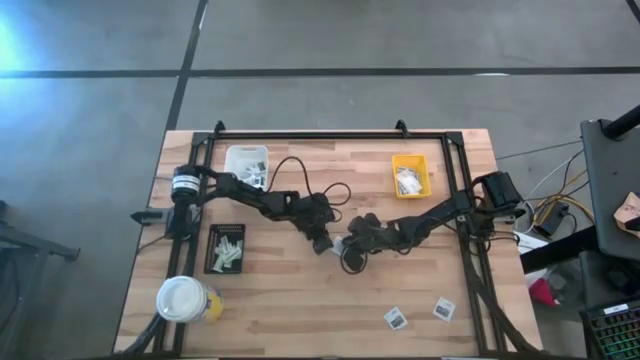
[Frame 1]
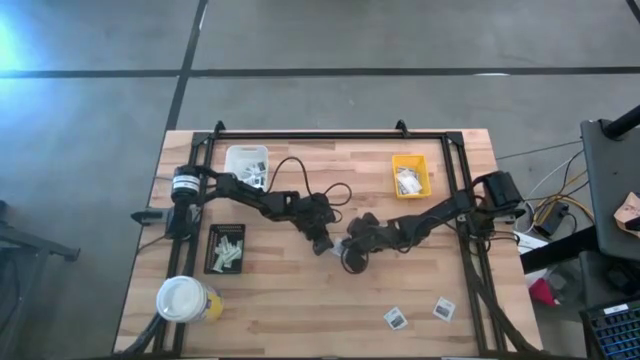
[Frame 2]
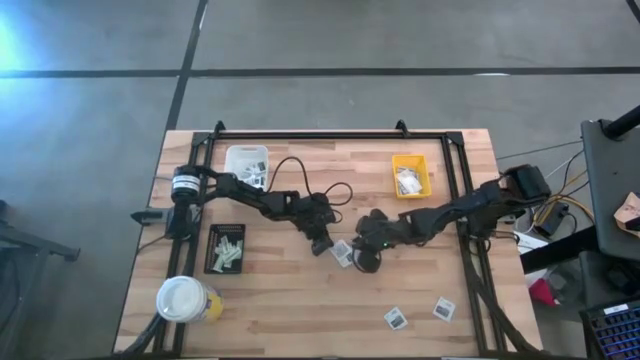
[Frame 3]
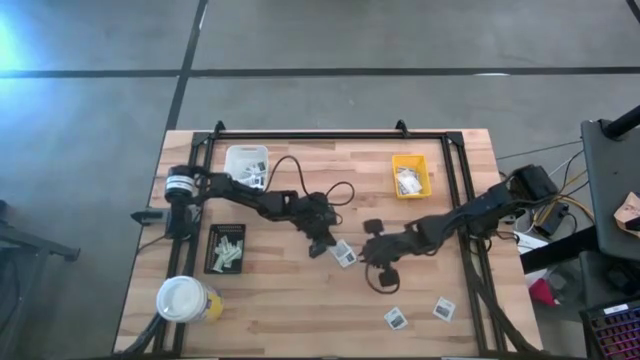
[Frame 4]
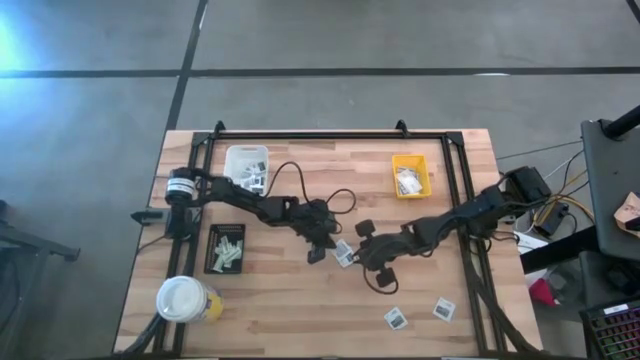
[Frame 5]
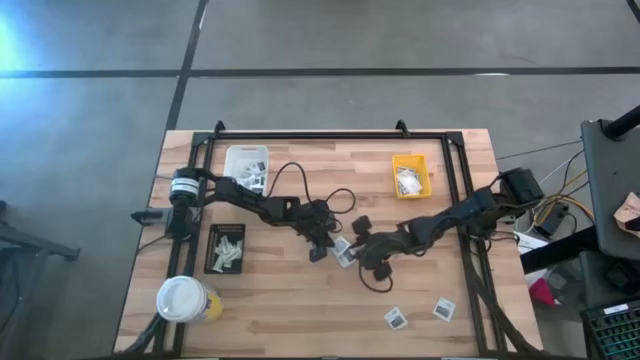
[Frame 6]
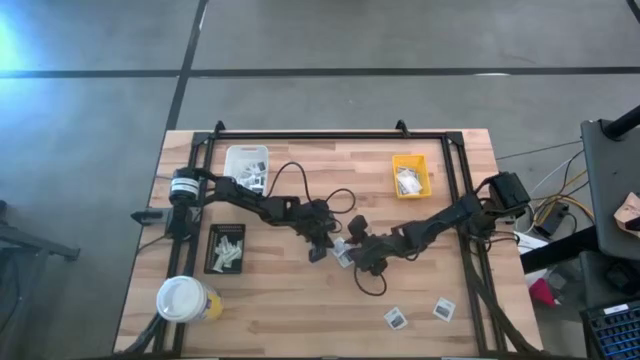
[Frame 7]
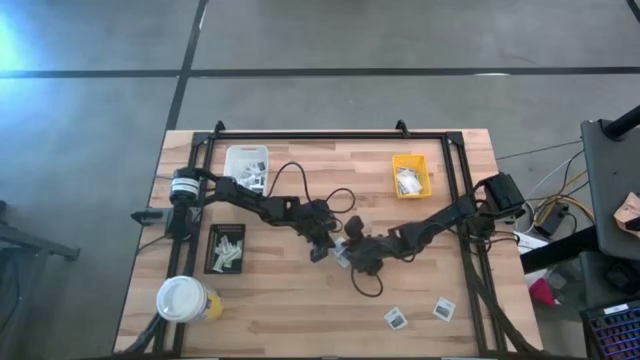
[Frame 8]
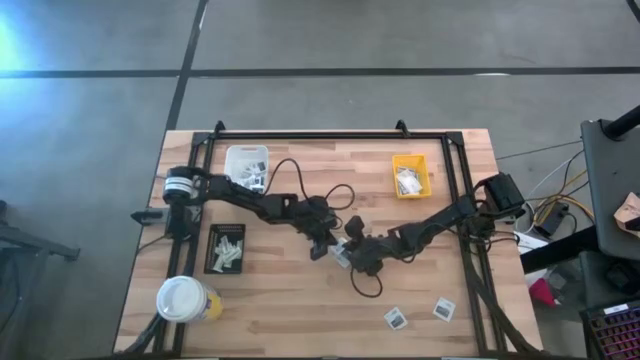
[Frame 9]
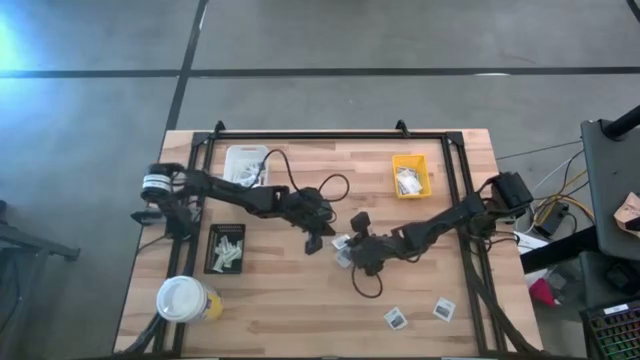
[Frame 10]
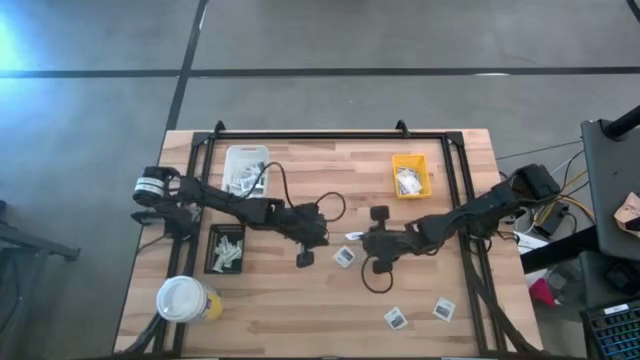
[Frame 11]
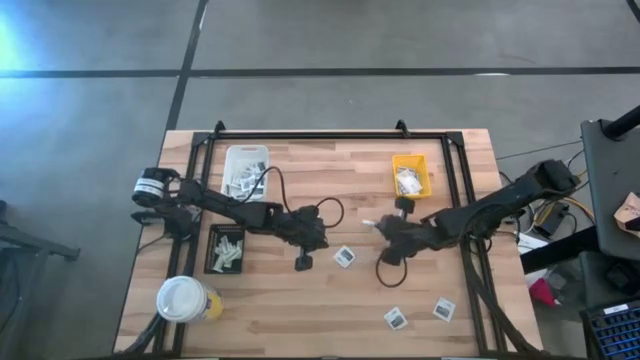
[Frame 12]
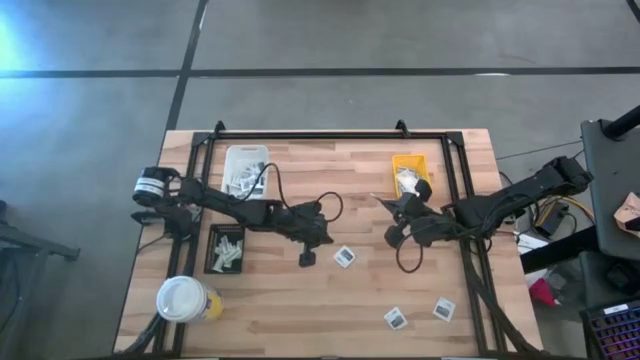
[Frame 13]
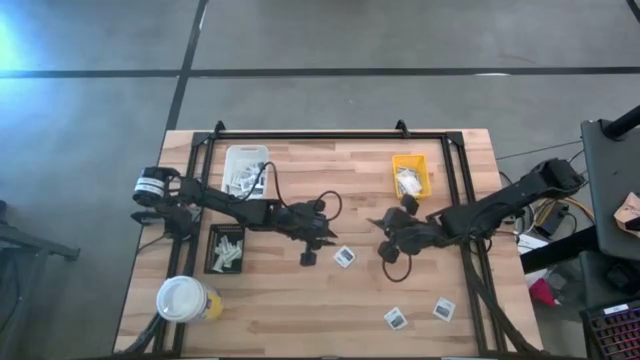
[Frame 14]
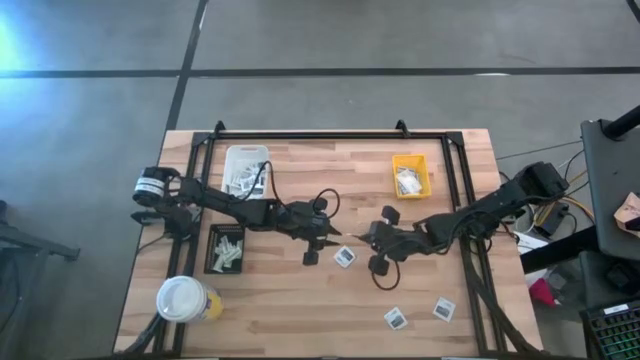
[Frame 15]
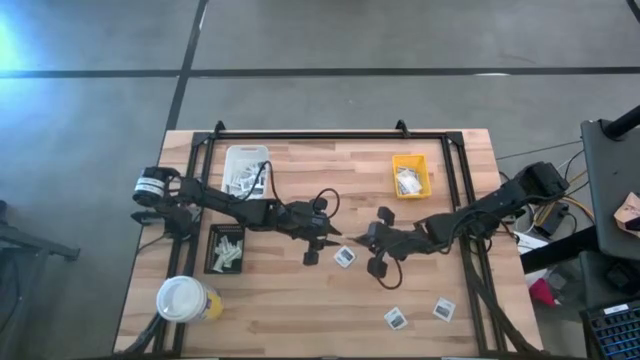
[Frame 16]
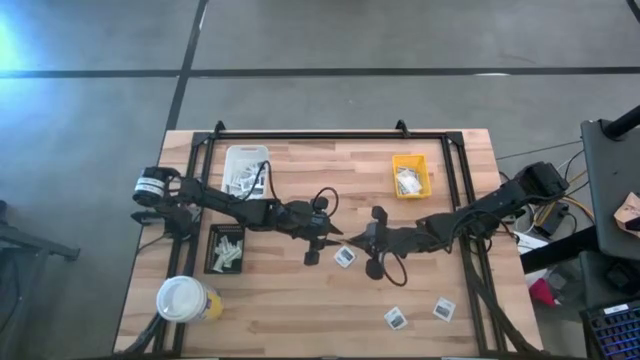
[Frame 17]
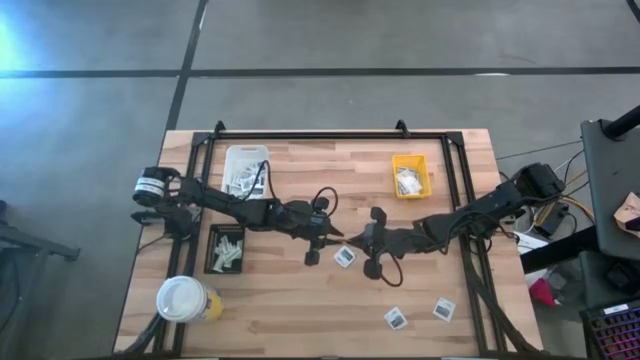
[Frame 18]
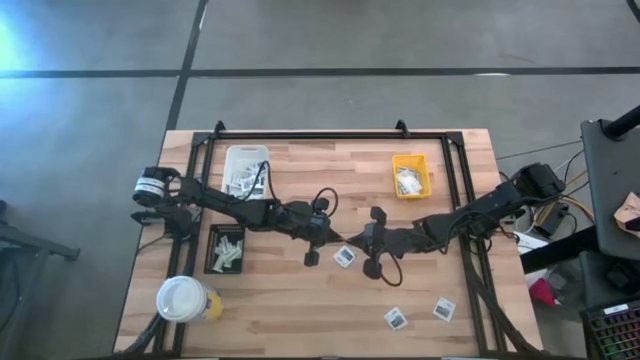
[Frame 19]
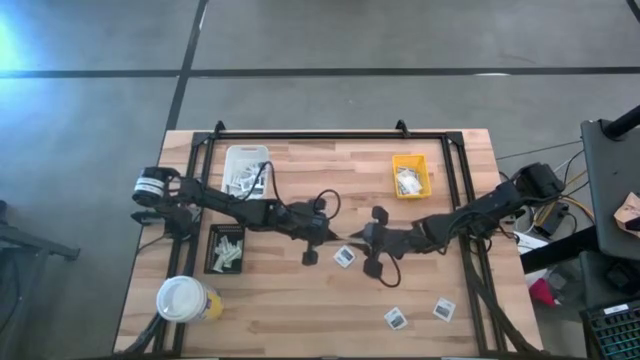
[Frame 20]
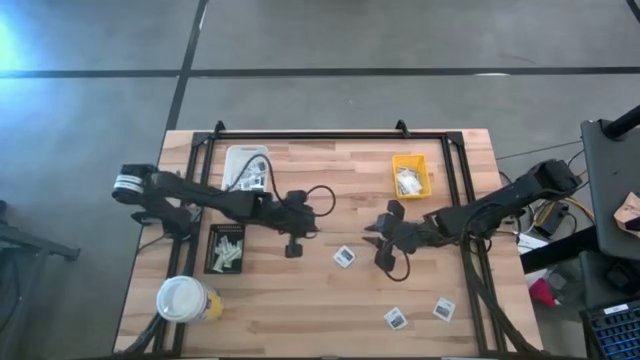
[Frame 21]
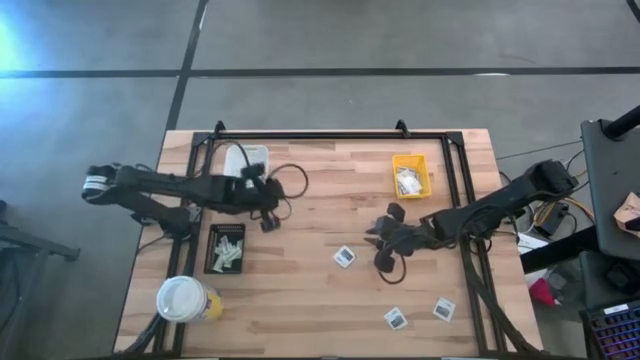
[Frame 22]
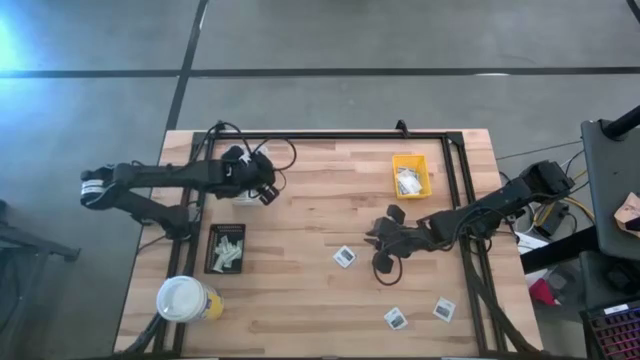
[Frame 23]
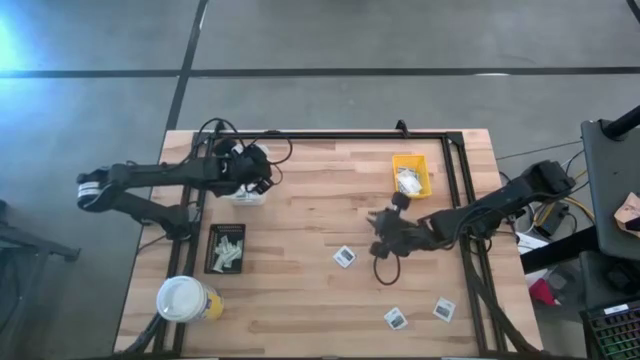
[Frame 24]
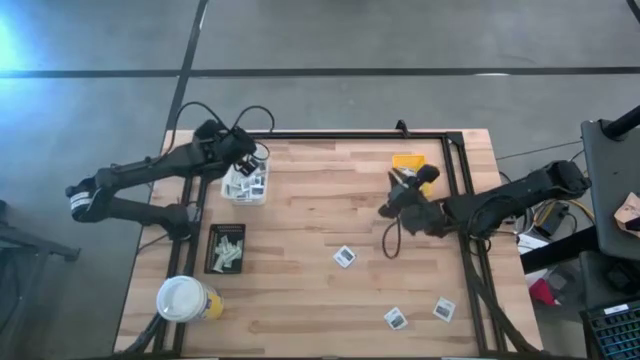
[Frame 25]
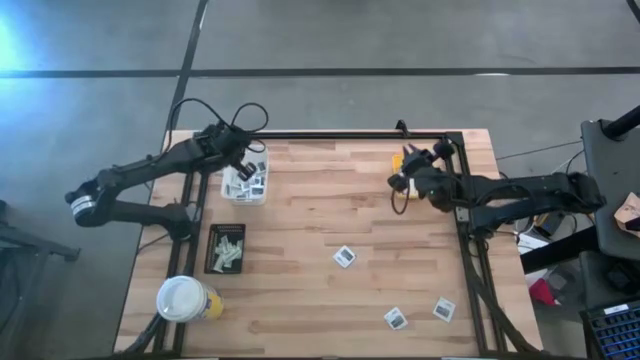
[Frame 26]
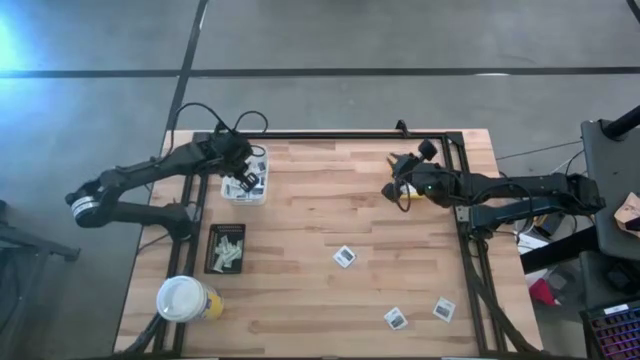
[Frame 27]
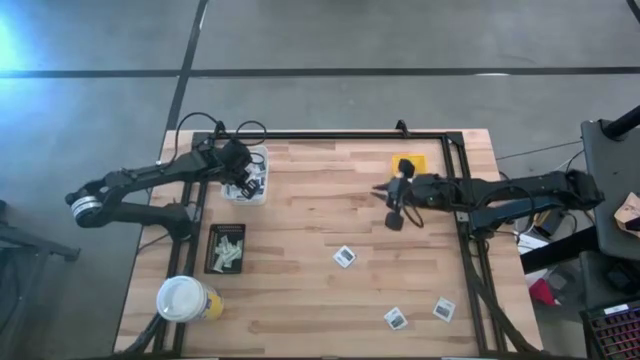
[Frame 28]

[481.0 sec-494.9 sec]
Task: Pick & Place First Aid Supplies
Put the gray towelette pack into the white bin

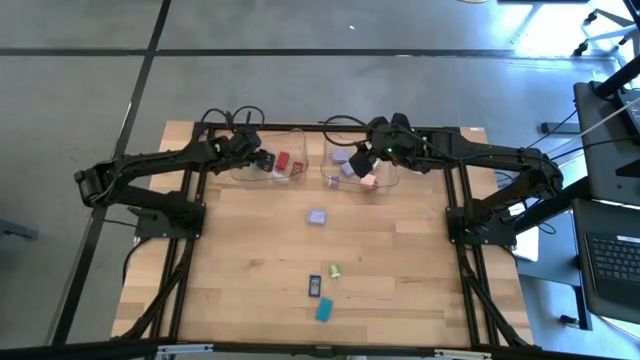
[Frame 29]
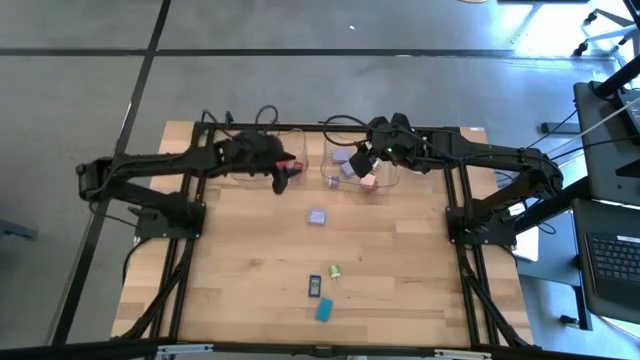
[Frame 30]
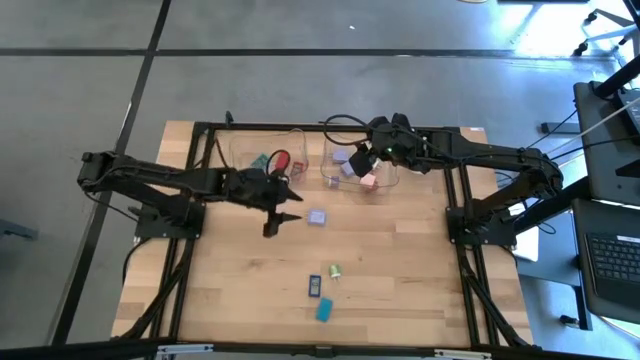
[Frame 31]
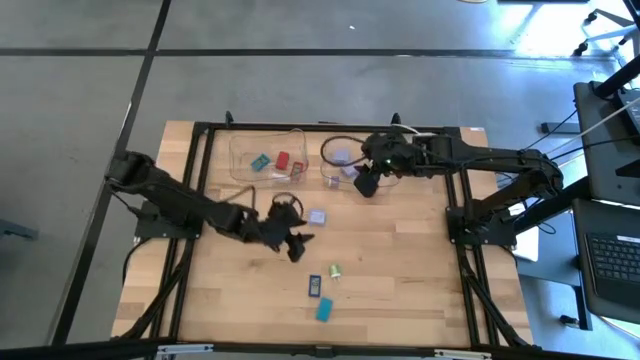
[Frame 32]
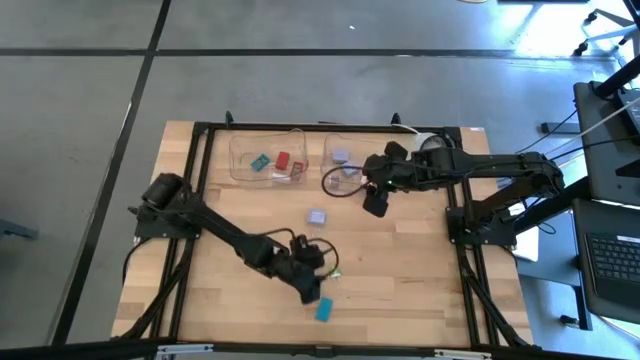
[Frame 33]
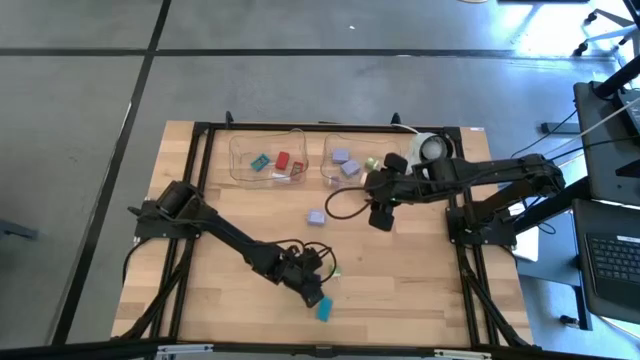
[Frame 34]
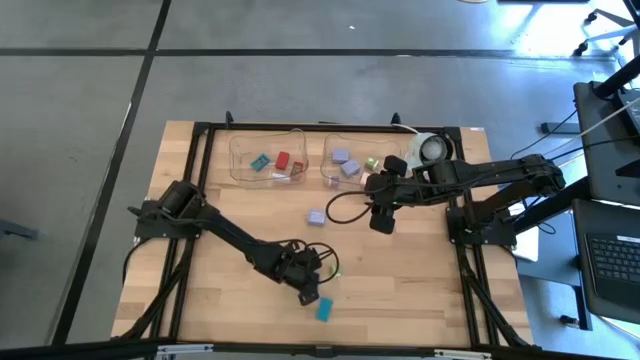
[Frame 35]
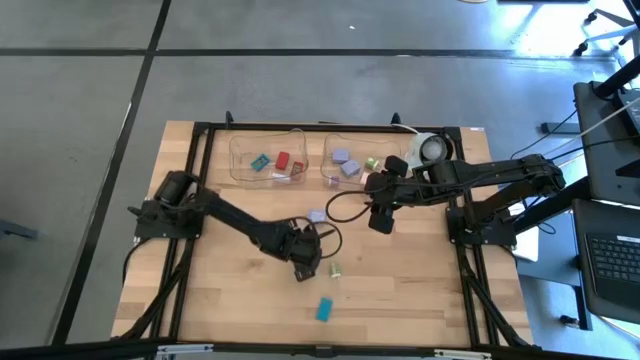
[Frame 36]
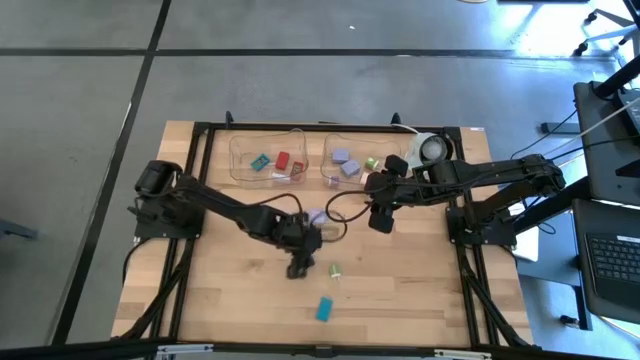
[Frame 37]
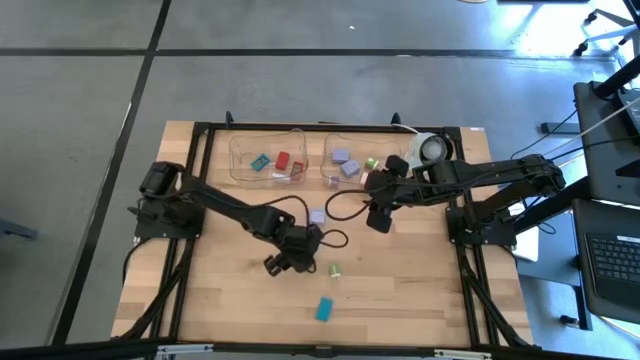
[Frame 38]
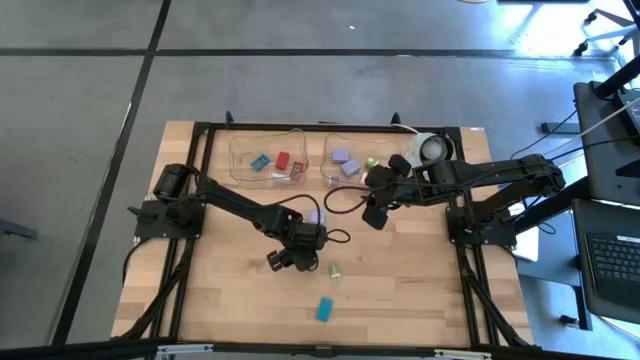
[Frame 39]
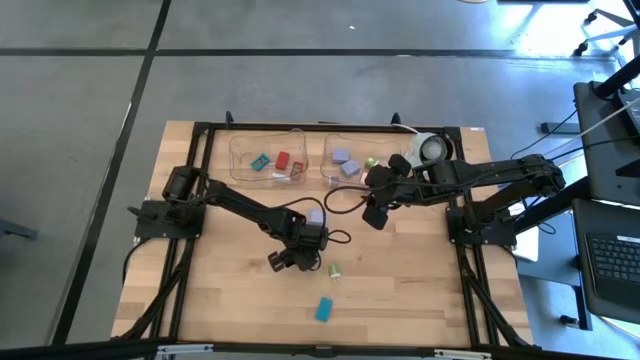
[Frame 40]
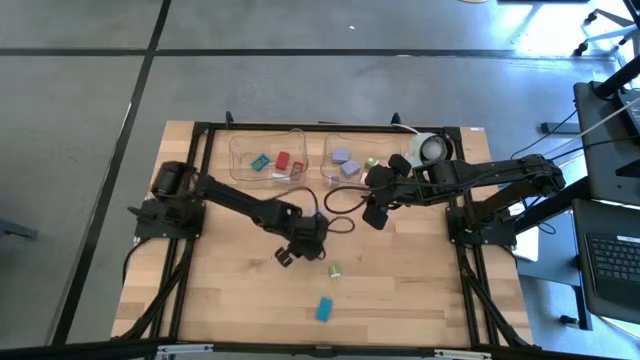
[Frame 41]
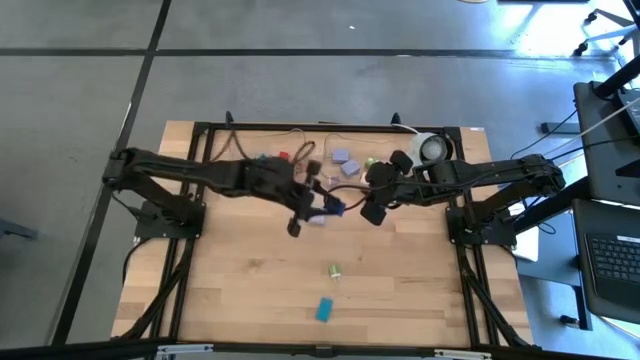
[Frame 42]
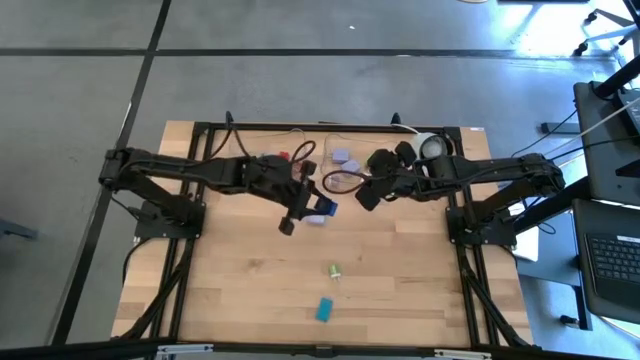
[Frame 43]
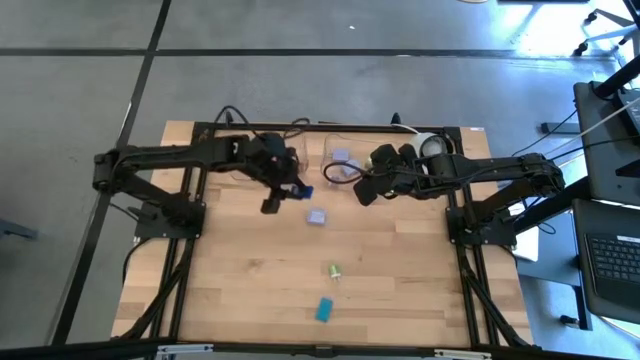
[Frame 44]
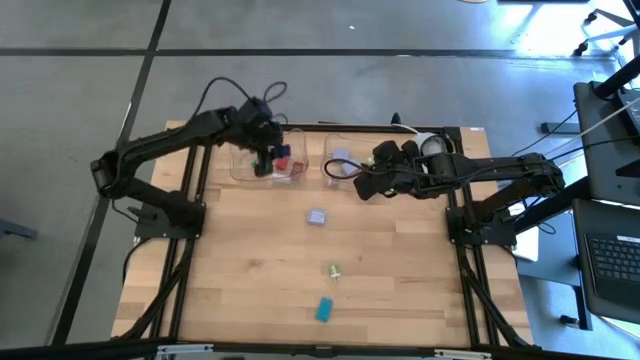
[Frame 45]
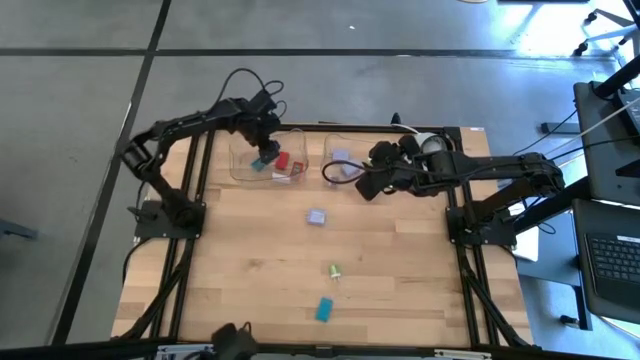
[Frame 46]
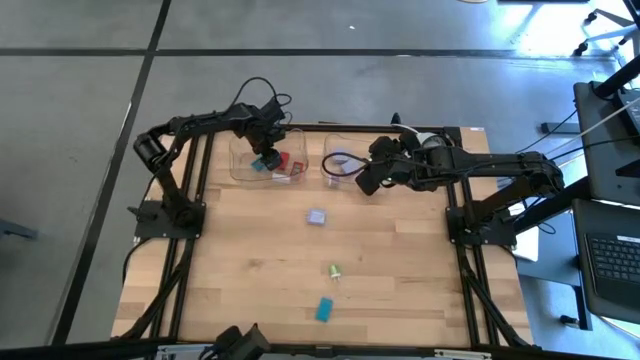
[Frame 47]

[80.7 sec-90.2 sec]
Task: Pick & Place Office items
Put the blue digital timer into the left transparent bin
